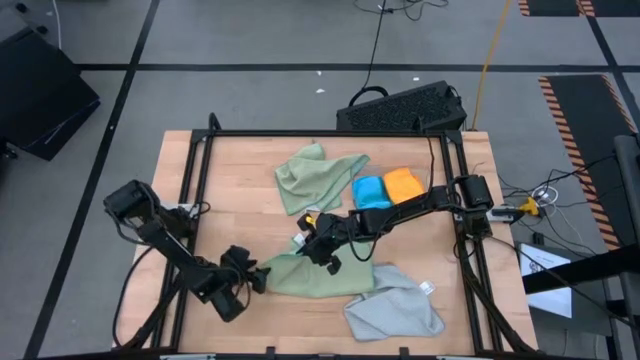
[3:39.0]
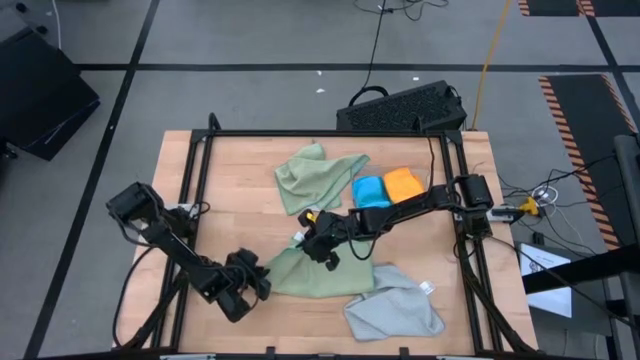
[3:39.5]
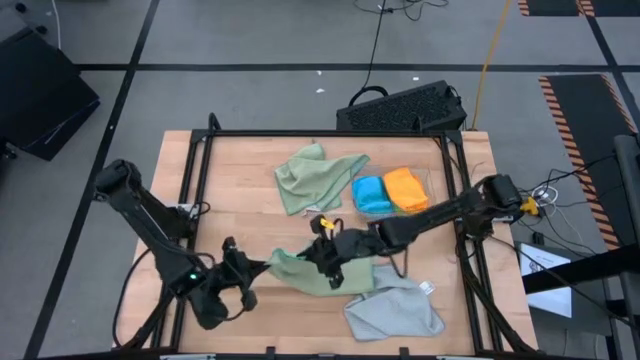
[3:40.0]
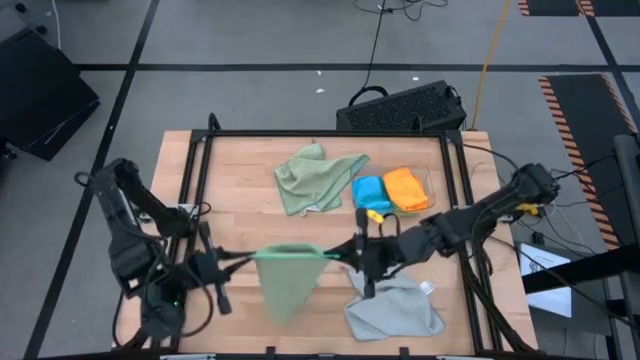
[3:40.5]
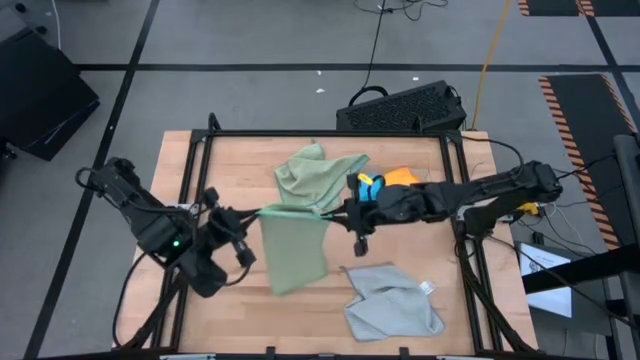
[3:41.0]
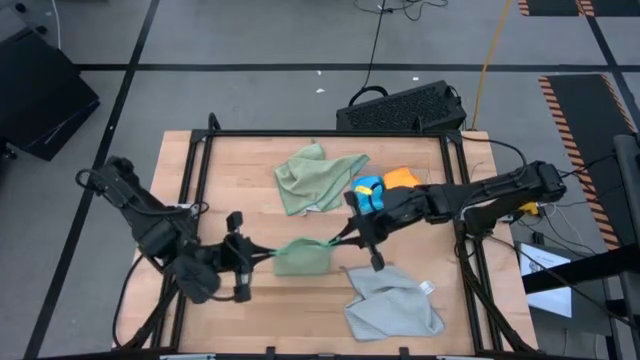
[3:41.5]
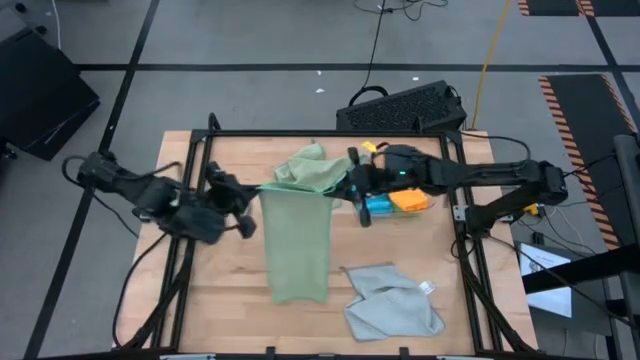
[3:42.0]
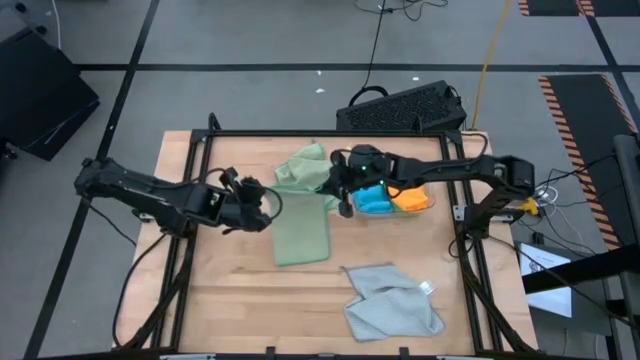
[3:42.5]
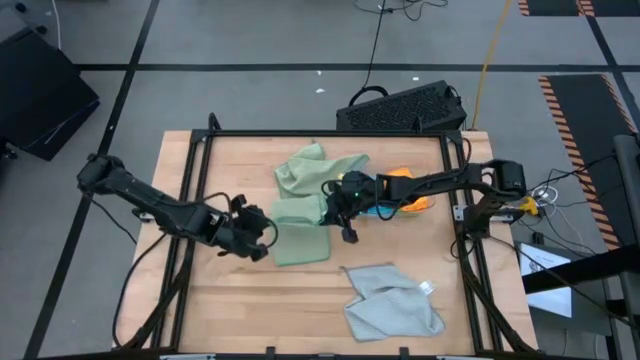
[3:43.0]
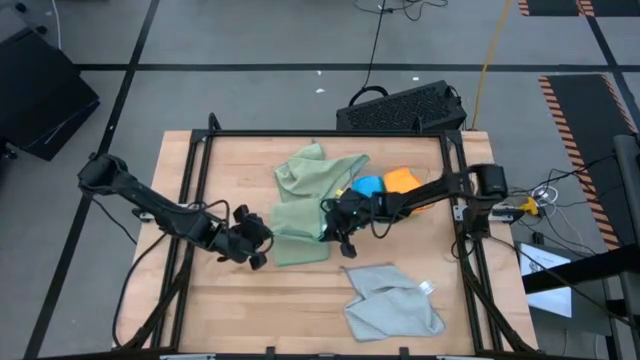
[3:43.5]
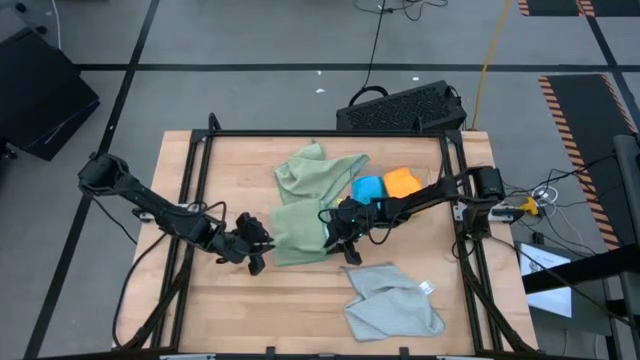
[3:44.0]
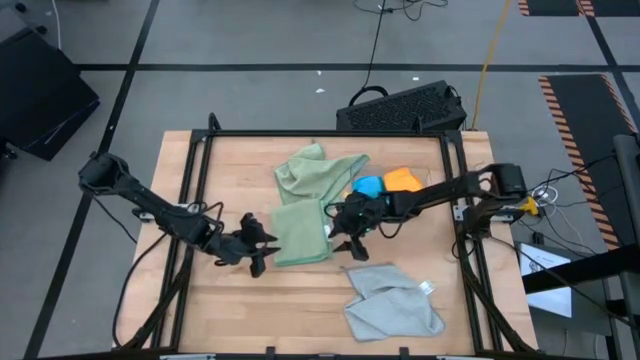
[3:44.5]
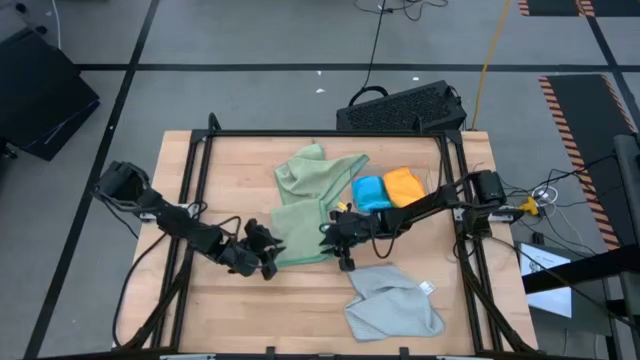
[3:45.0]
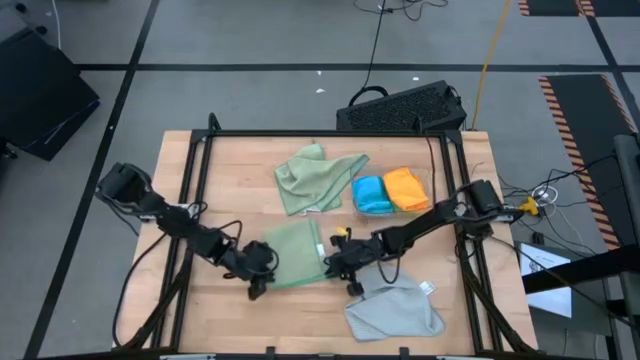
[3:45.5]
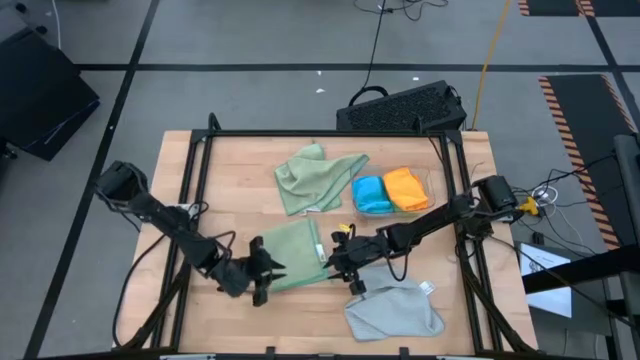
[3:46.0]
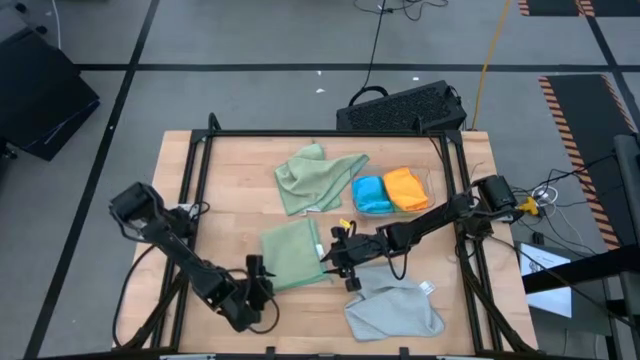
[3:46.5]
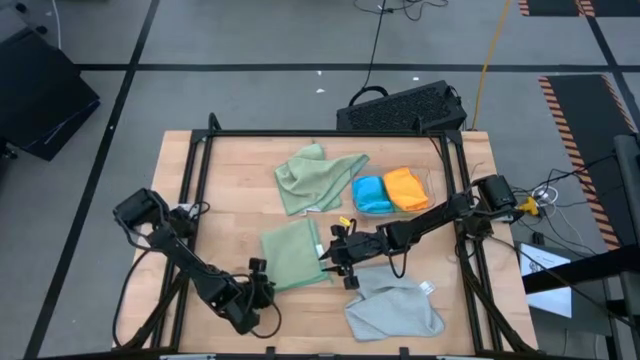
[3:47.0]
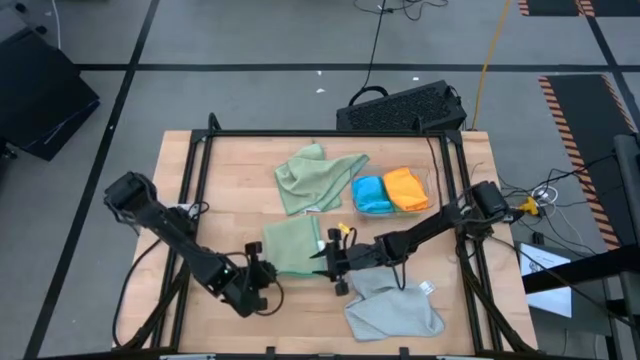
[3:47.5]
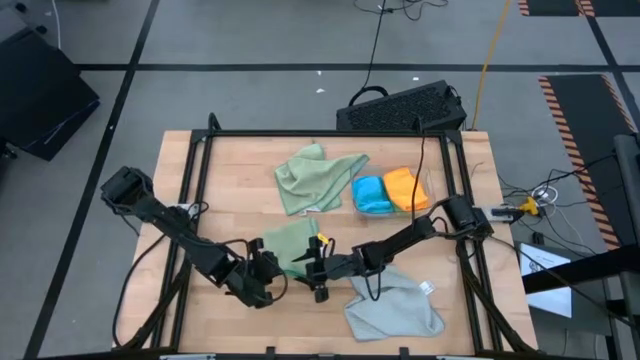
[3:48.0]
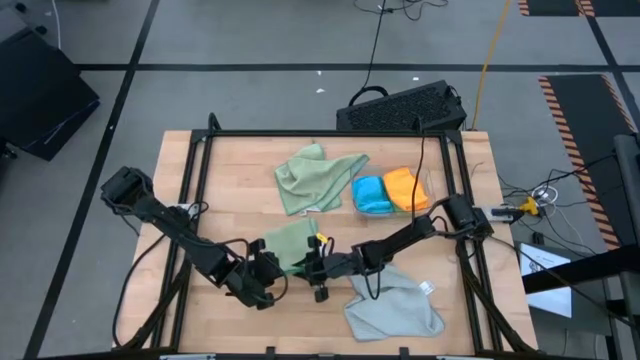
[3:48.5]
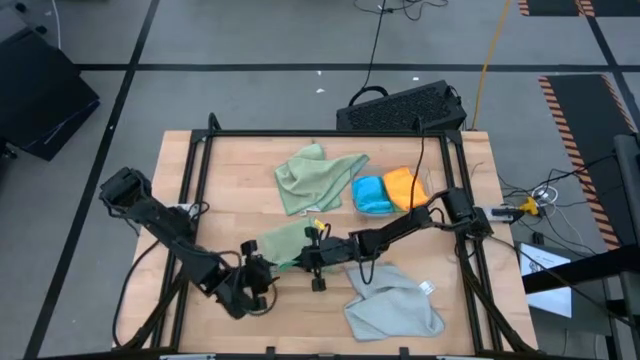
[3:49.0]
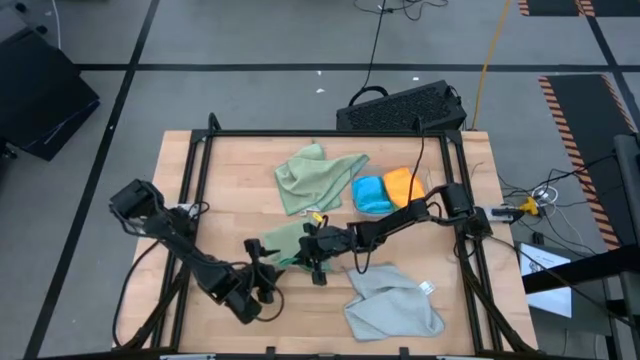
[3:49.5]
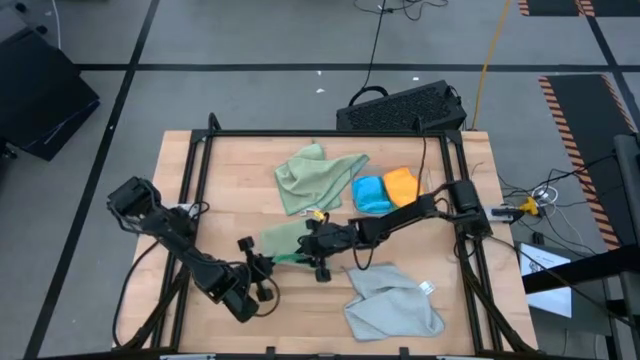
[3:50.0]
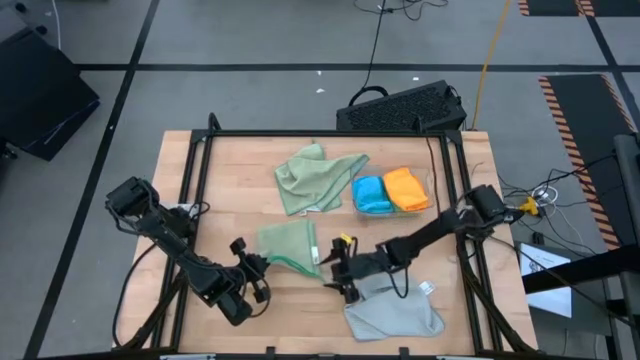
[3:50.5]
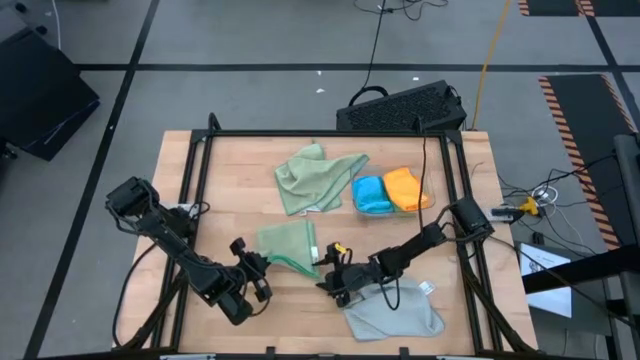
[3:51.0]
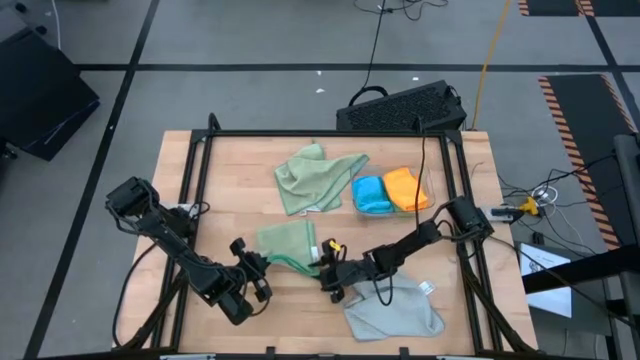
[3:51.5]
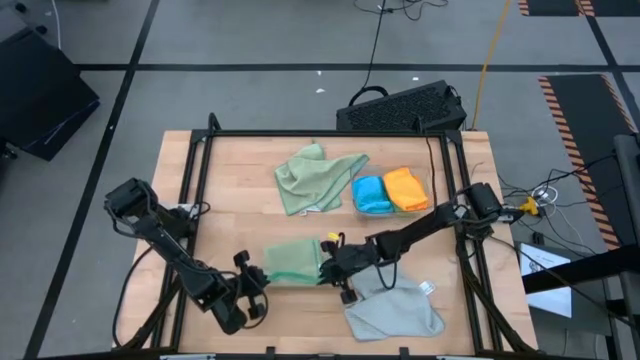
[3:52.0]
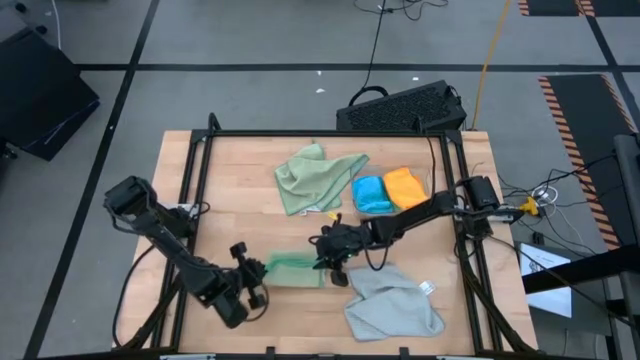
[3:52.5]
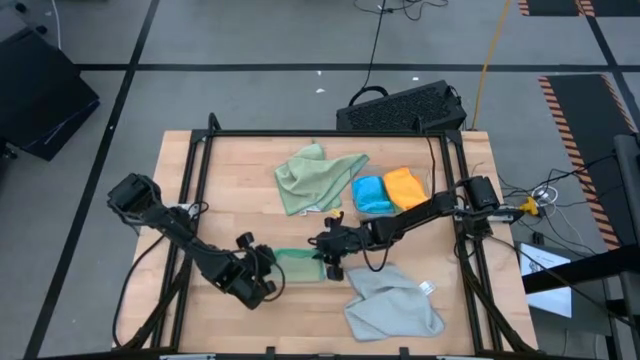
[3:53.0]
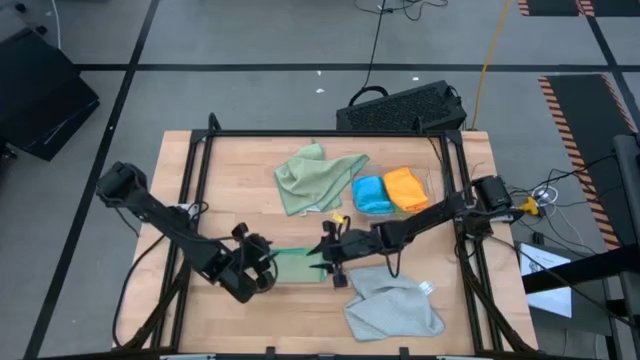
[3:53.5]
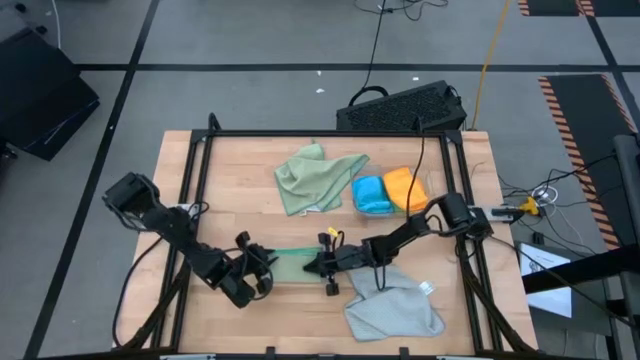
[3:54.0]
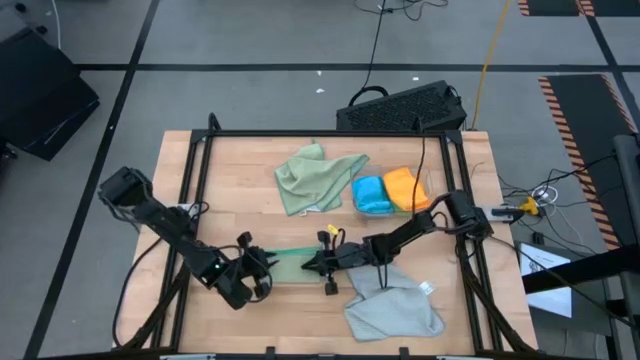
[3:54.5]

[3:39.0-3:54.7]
Task: Fold microfiber towels
Fold the left light green microfiber cloth

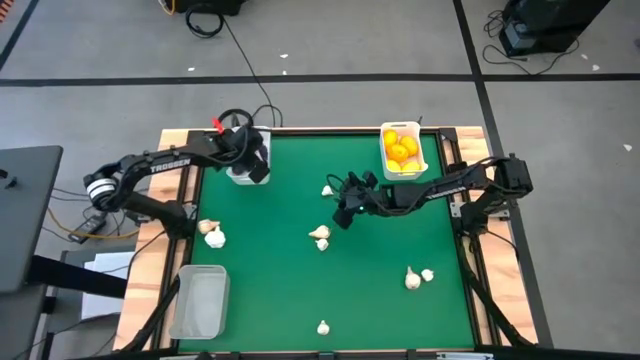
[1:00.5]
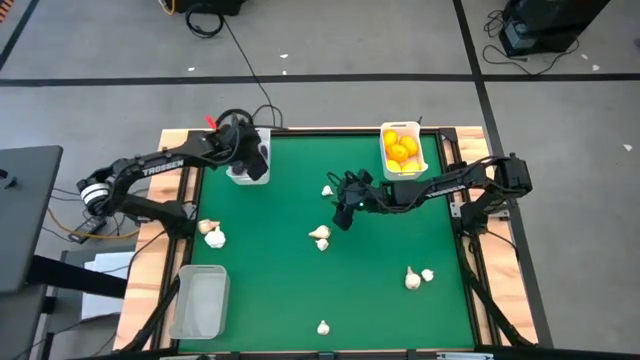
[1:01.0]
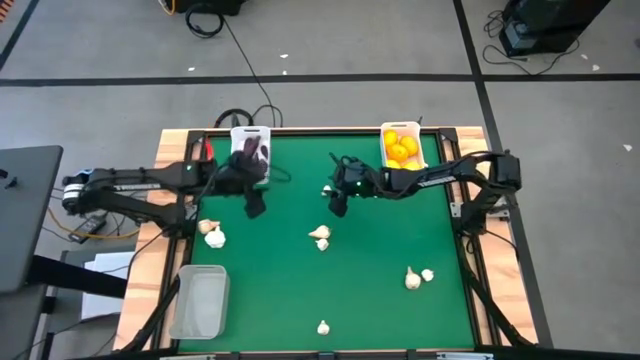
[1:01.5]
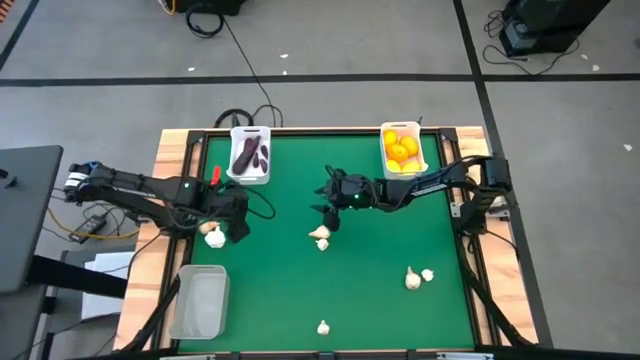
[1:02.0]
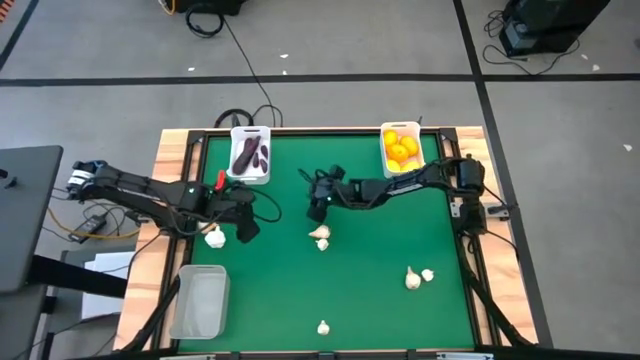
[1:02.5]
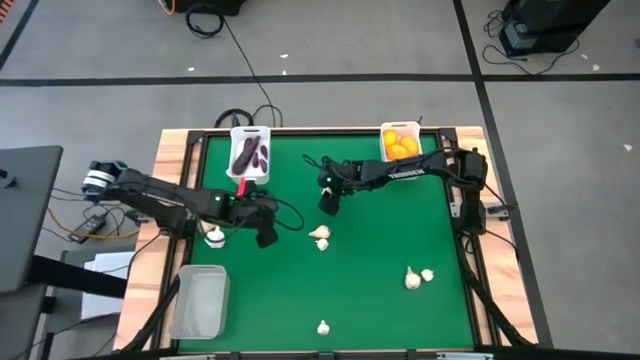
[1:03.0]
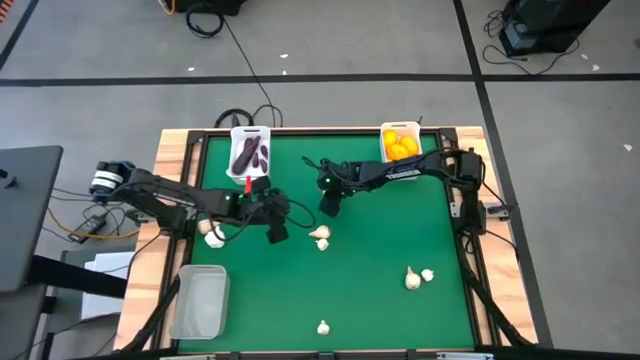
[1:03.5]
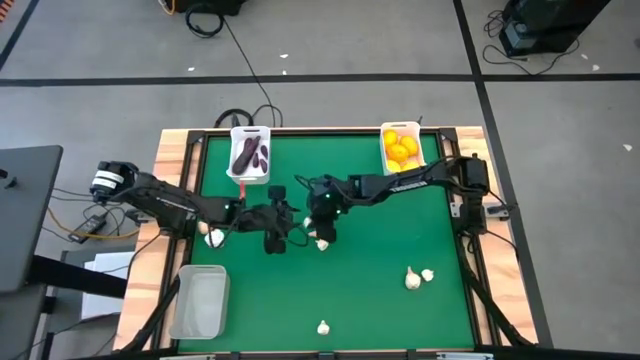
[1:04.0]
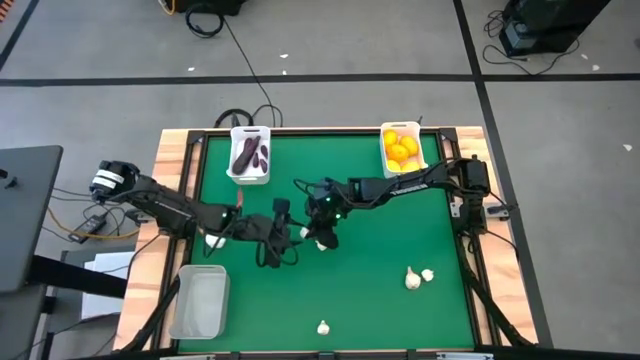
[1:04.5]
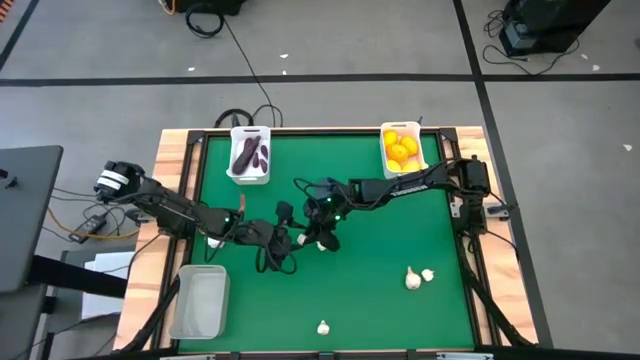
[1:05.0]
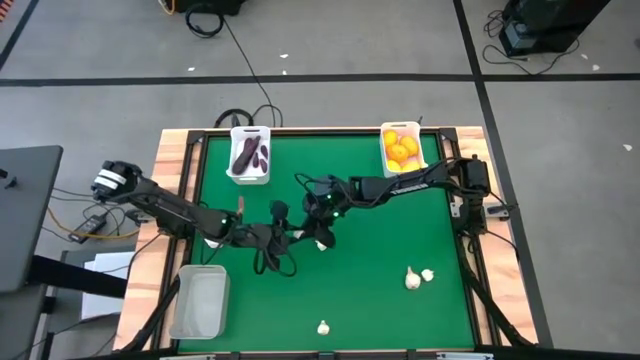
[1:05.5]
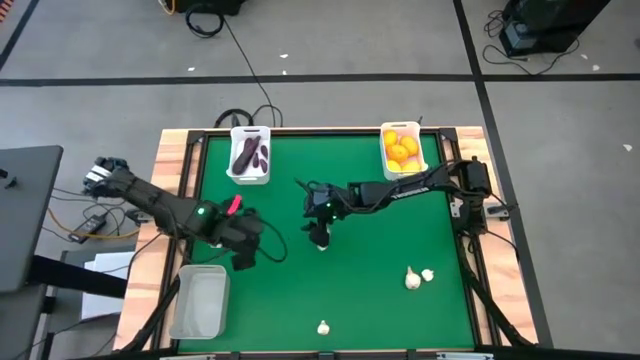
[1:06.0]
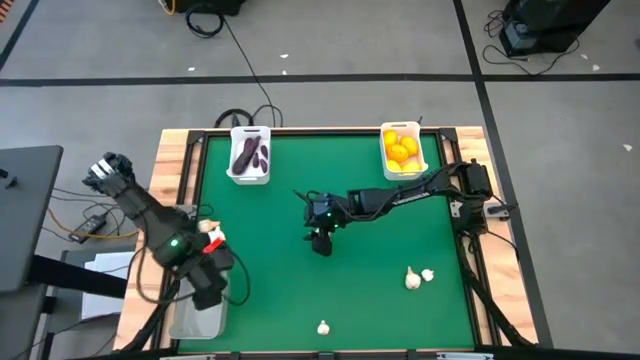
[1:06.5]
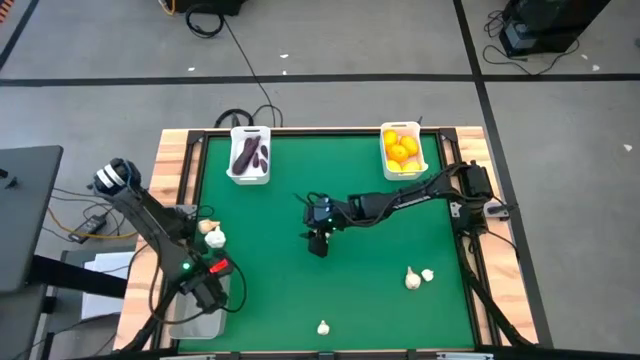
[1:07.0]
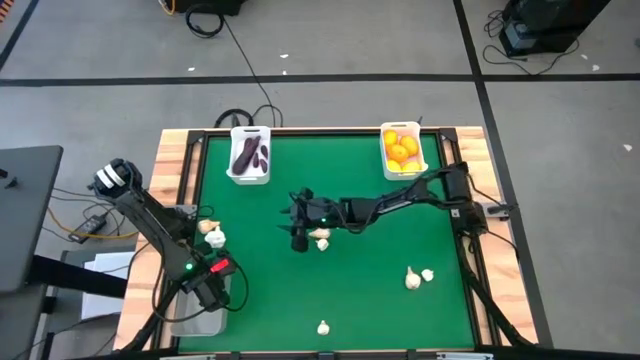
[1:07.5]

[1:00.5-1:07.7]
Task: Sort produce into baskets
Put the top small garlic into the gray bin
